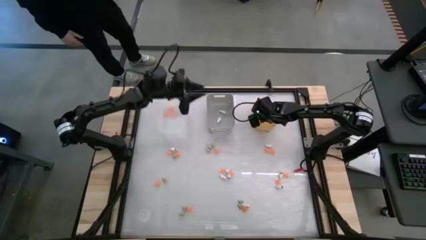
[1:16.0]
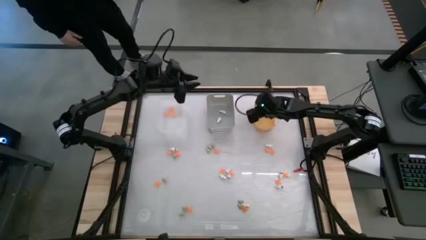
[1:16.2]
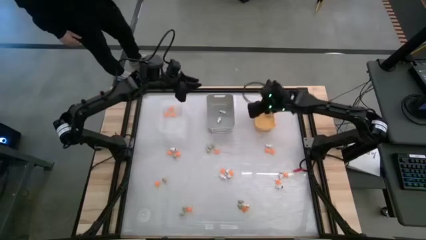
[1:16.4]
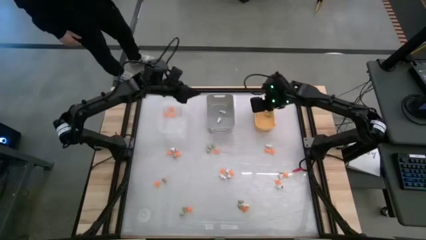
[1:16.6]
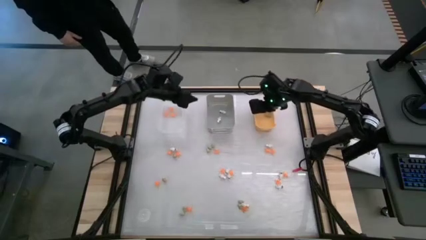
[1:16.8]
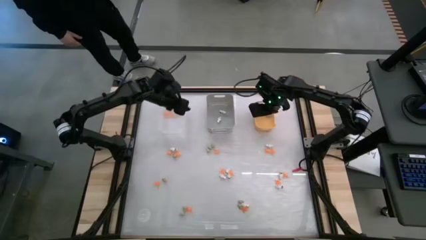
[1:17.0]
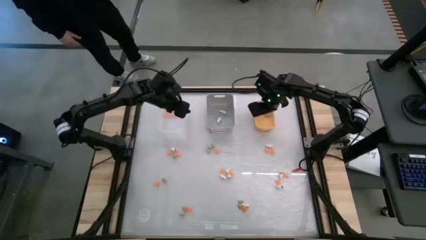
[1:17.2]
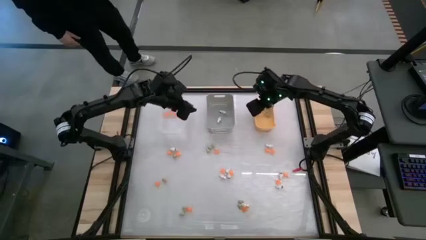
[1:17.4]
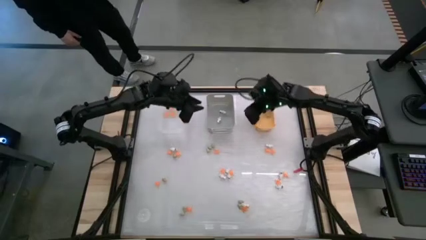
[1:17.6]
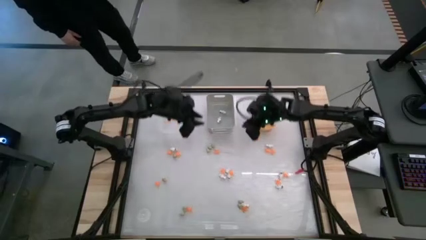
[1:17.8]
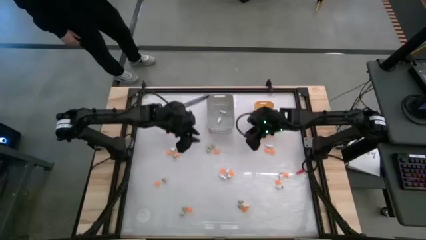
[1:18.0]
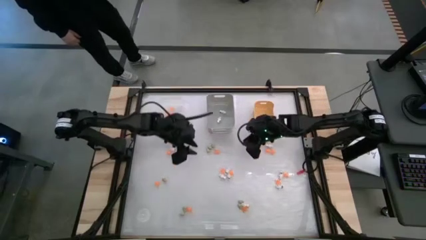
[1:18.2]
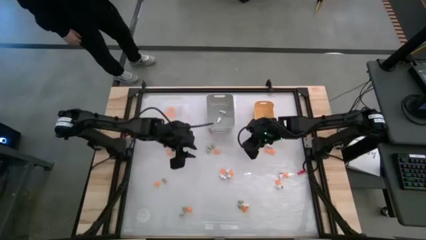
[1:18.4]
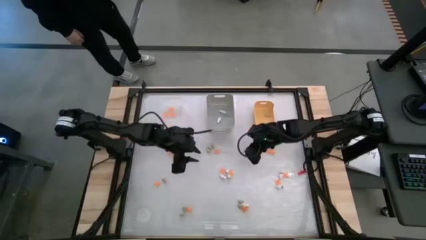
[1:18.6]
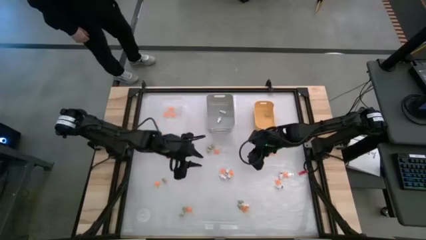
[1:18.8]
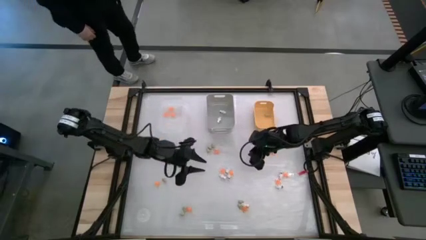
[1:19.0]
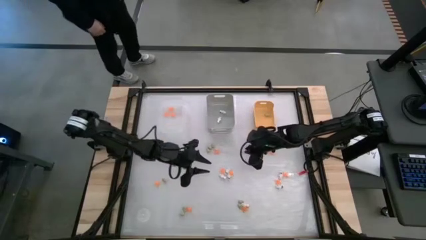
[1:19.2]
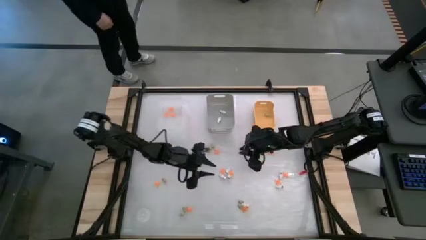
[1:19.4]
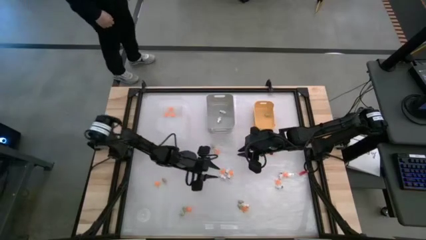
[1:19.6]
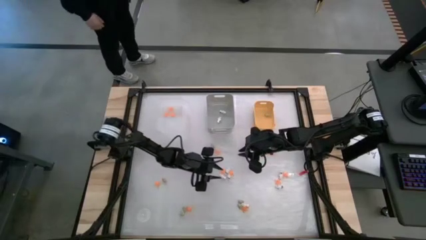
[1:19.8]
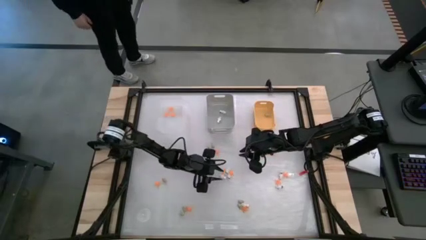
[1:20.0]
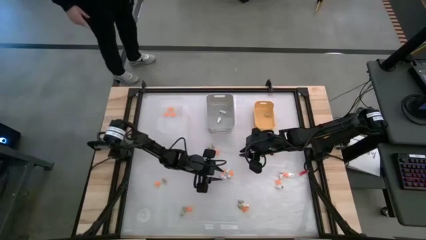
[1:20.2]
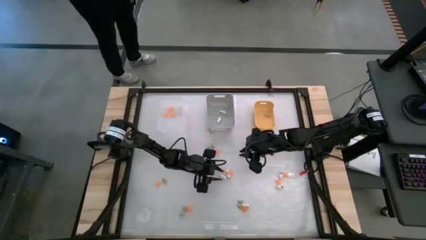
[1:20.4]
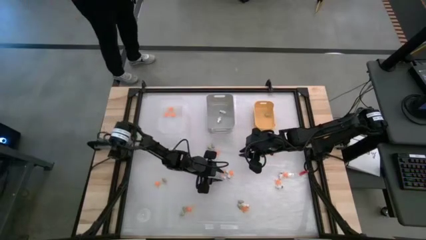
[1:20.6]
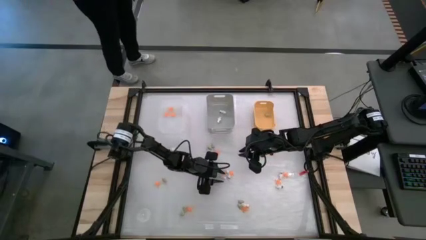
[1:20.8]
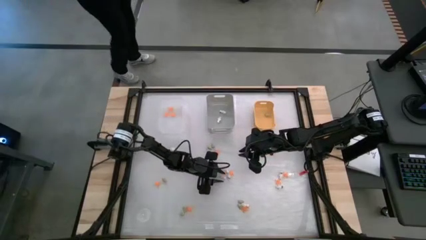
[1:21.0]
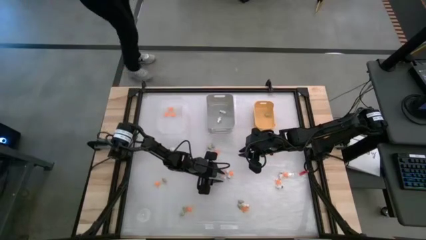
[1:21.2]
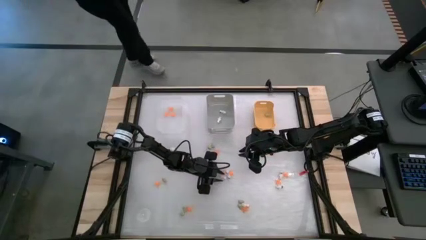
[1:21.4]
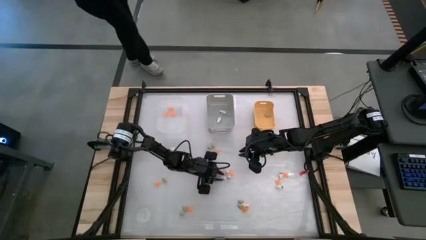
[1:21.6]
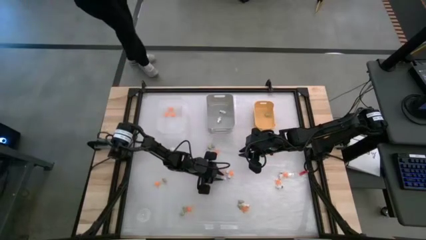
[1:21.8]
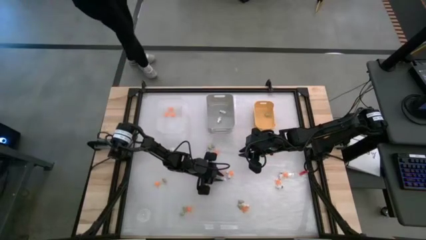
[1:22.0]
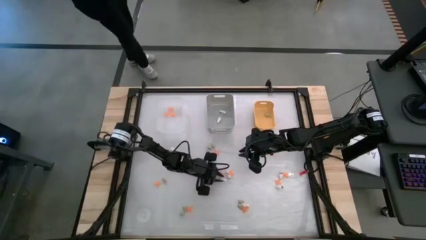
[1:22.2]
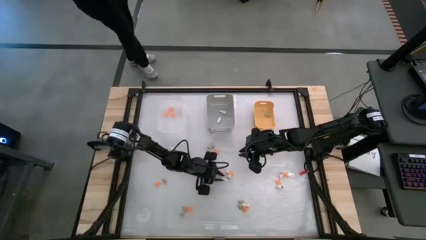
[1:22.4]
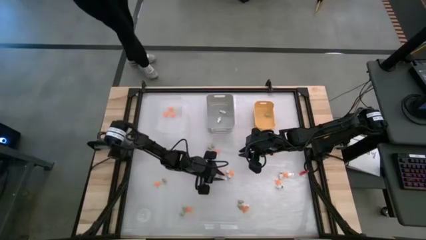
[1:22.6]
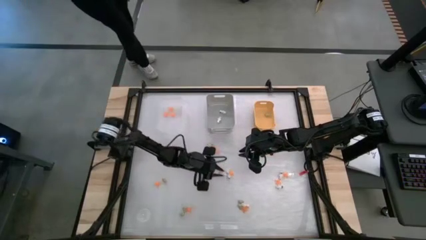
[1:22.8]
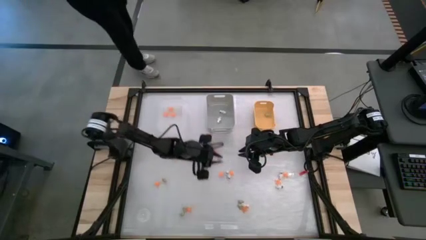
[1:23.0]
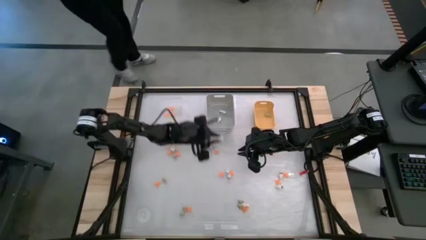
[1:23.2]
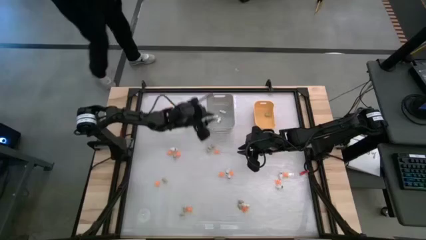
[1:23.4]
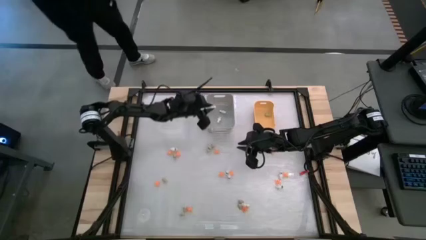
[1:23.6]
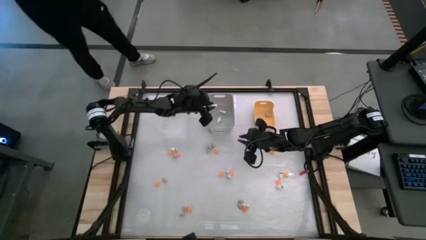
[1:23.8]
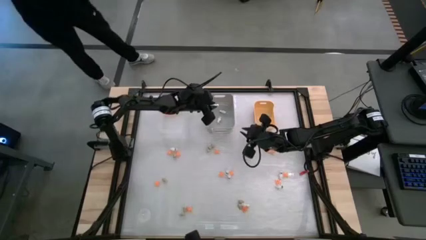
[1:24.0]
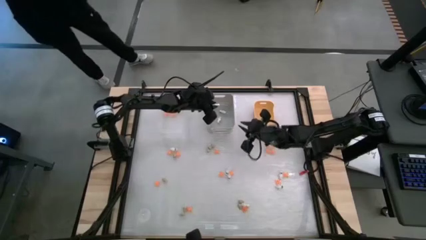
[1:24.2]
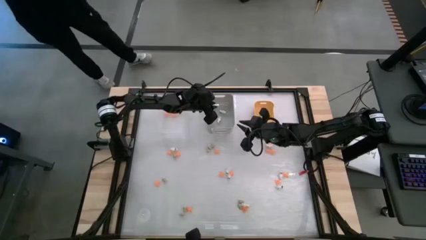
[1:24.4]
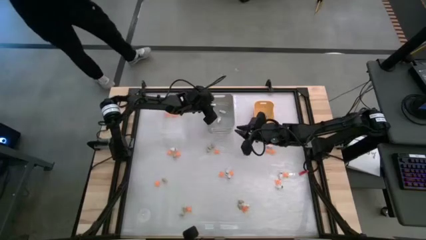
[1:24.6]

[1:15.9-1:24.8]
Task: Sort Halloween decoration
Put the white skeleton toy into the gray bin

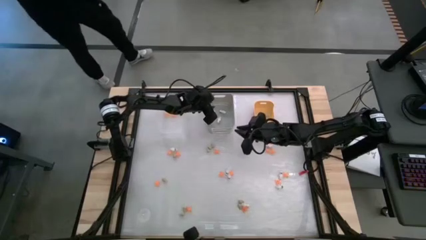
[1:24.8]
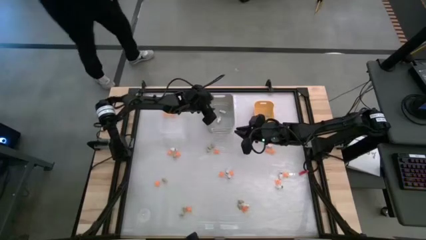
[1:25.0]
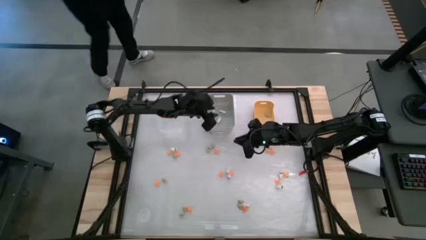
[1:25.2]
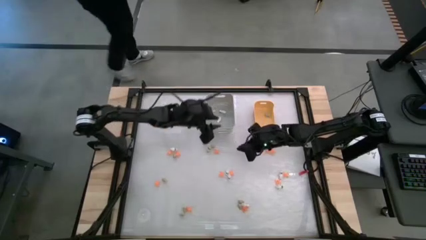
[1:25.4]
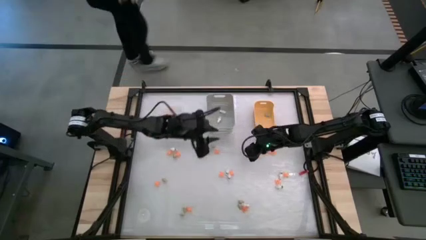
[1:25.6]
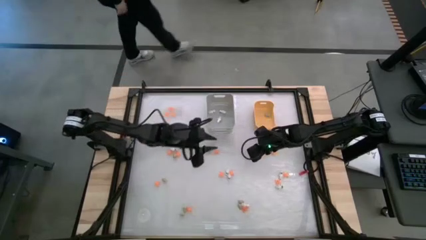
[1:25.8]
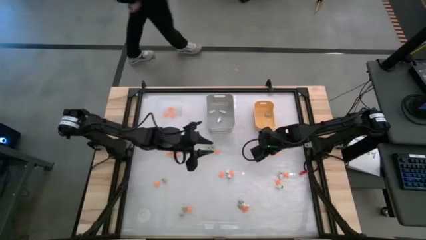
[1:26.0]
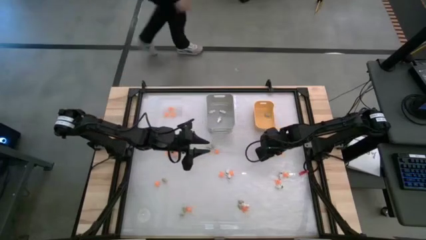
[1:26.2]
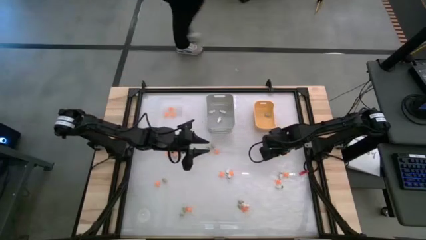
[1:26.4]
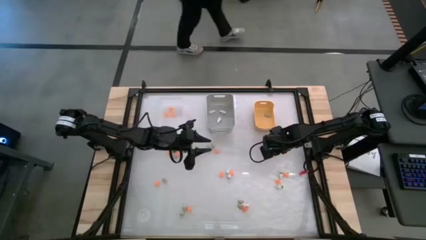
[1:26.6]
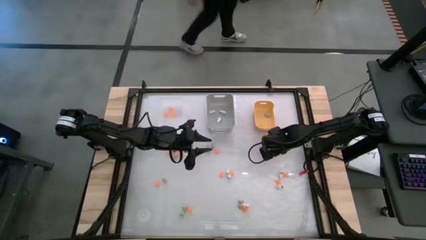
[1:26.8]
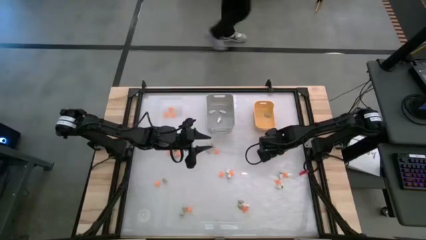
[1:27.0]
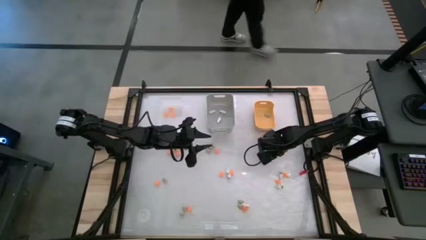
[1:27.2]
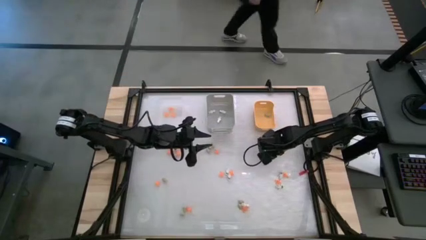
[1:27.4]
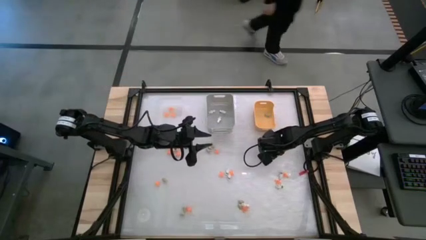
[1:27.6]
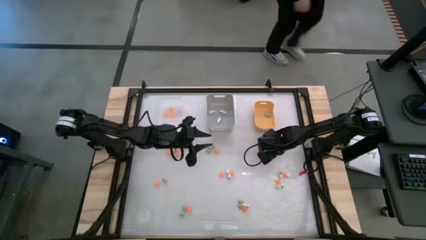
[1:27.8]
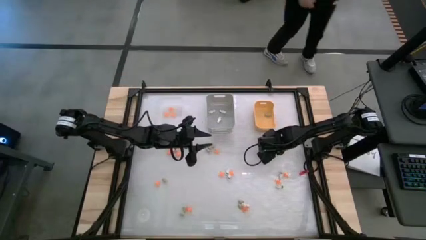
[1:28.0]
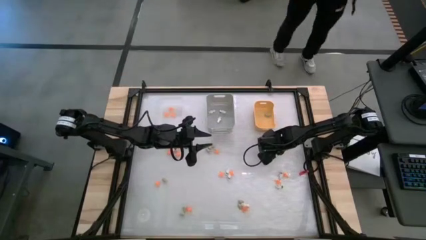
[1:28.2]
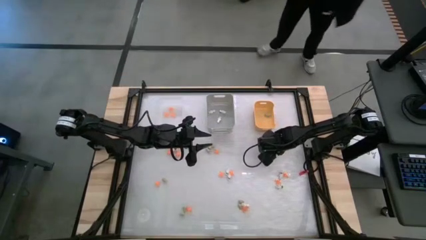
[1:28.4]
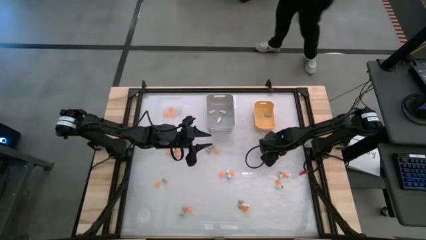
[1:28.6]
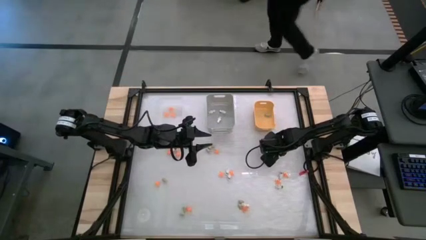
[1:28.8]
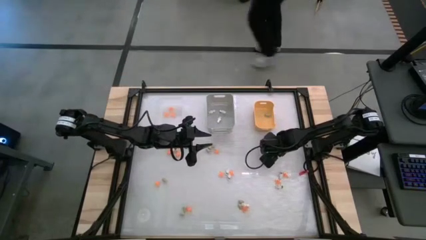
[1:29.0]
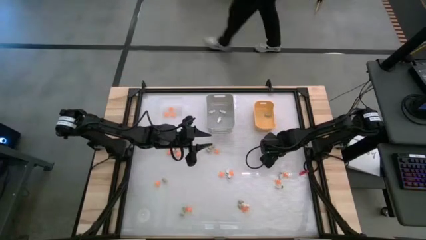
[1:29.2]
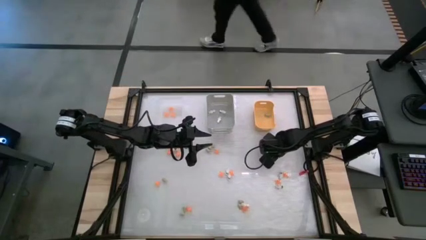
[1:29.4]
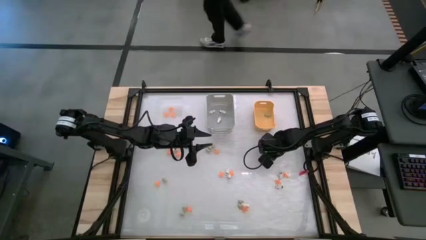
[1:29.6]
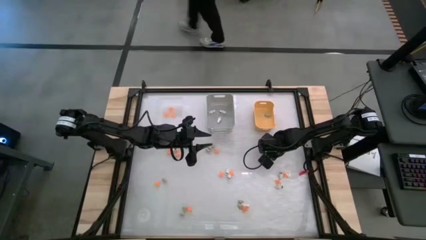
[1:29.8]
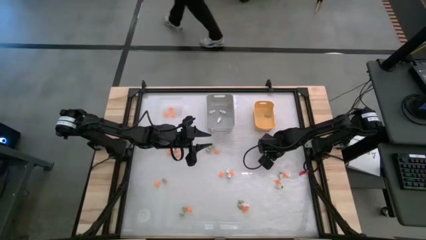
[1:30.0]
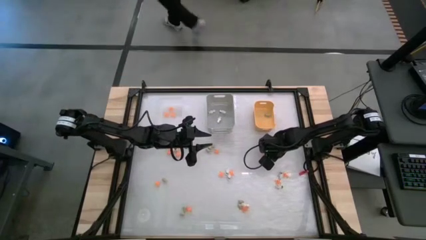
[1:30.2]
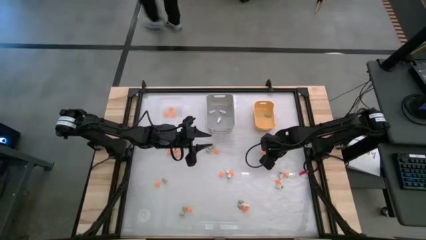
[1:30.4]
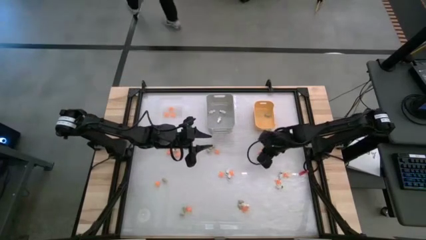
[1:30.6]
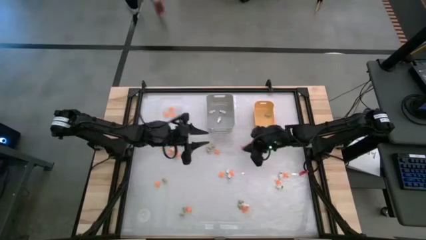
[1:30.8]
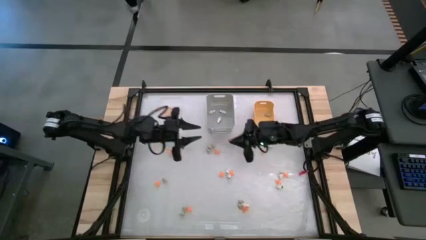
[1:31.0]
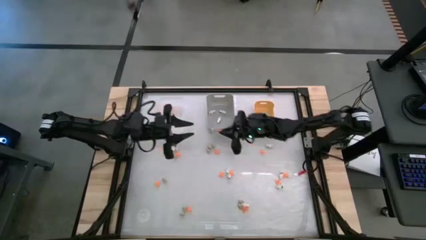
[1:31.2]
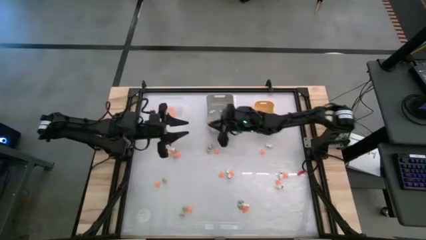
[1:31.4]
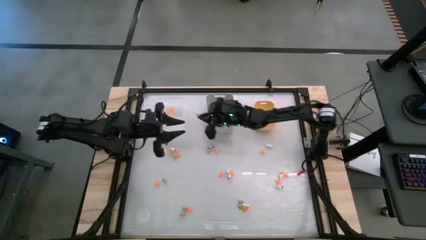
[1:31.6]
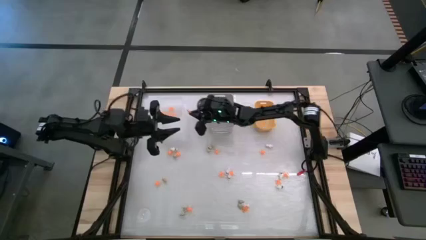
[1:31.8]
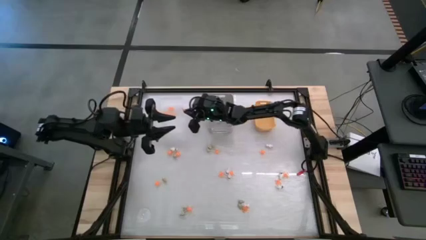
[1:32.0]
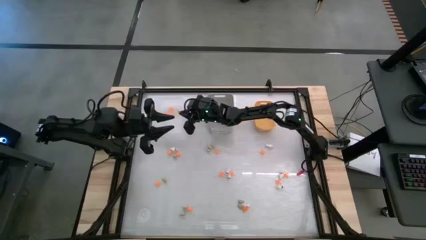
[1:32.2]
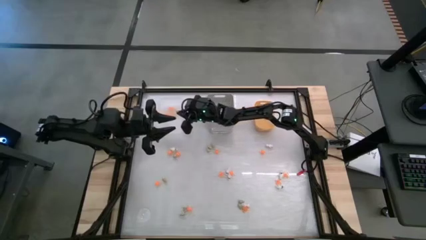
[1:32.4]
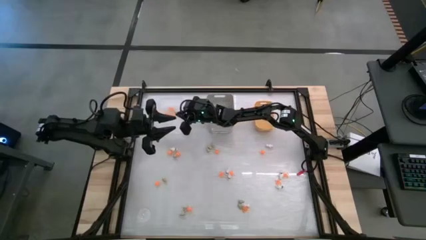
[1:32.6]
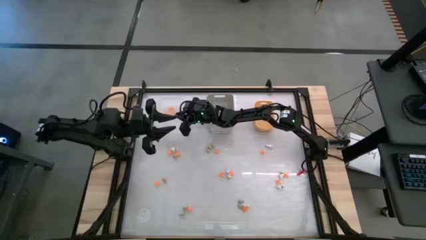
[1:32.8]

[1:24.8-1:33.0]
Put the orange spider toy into the transparent white bin
